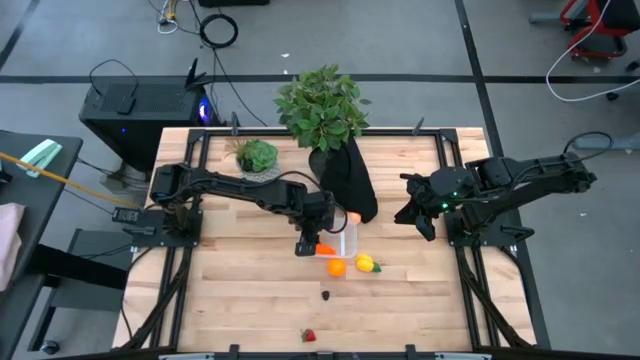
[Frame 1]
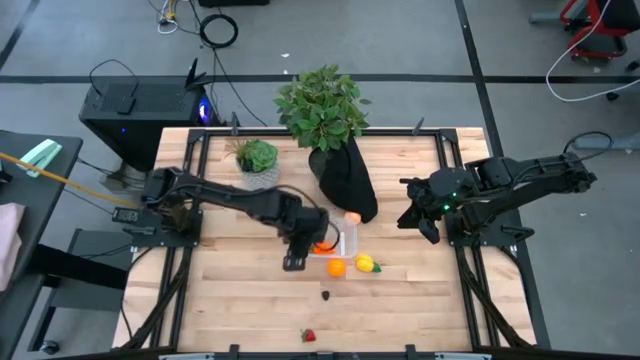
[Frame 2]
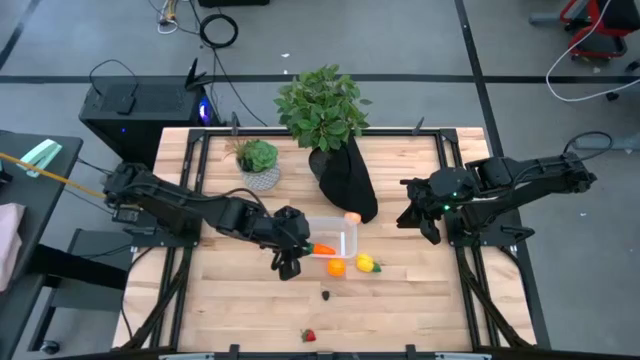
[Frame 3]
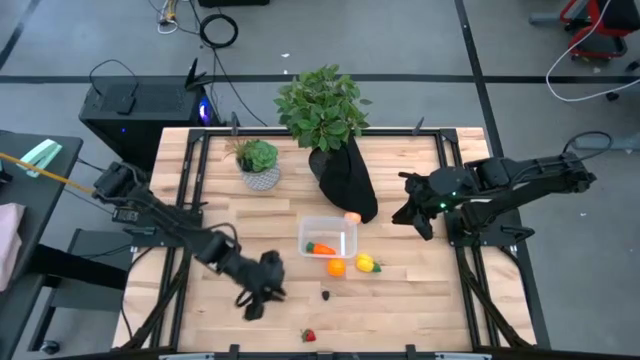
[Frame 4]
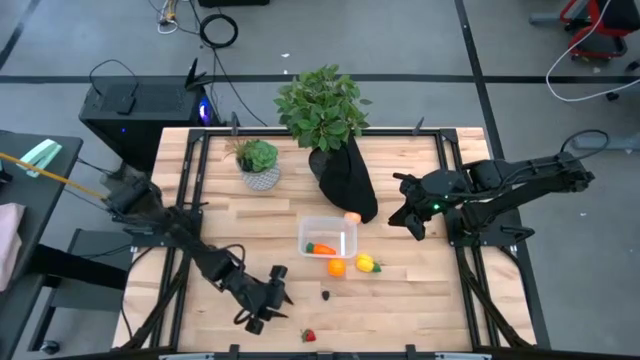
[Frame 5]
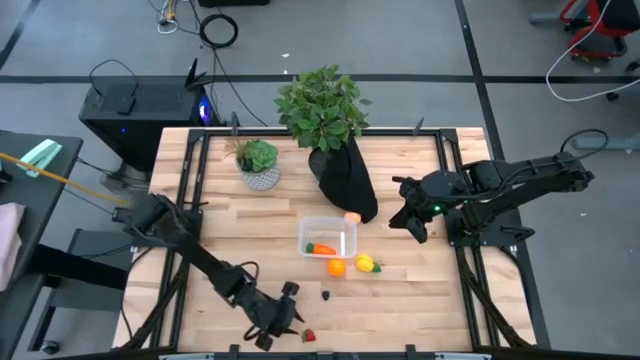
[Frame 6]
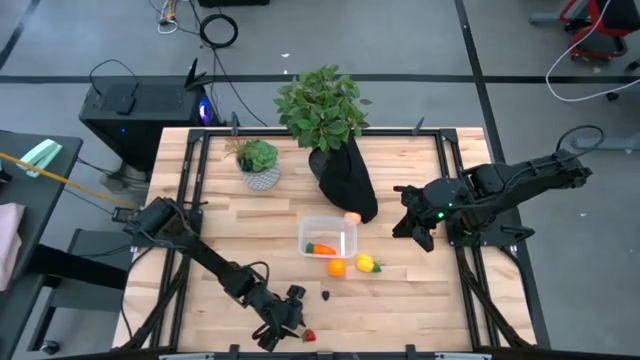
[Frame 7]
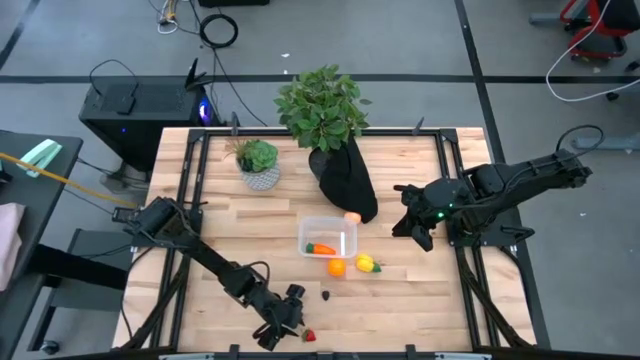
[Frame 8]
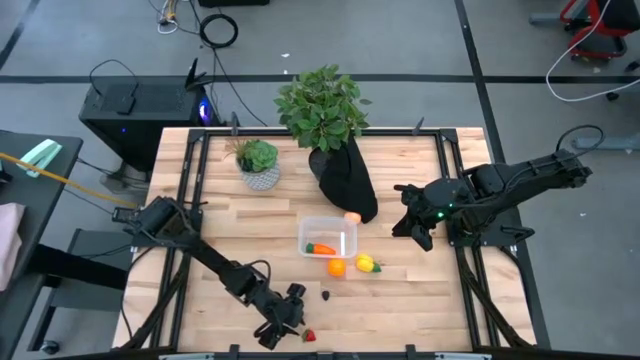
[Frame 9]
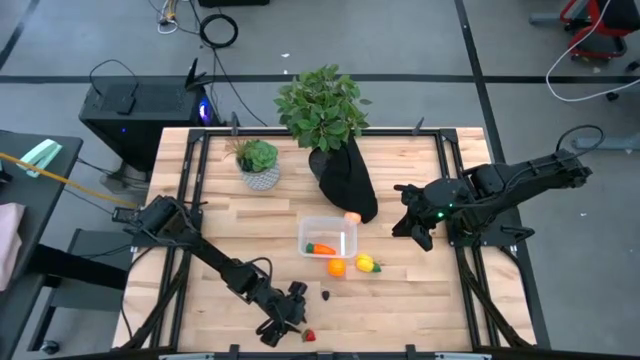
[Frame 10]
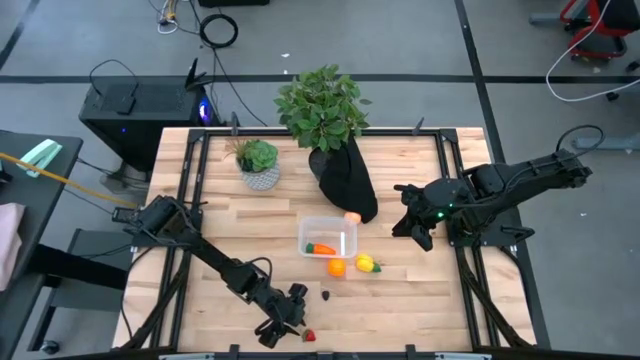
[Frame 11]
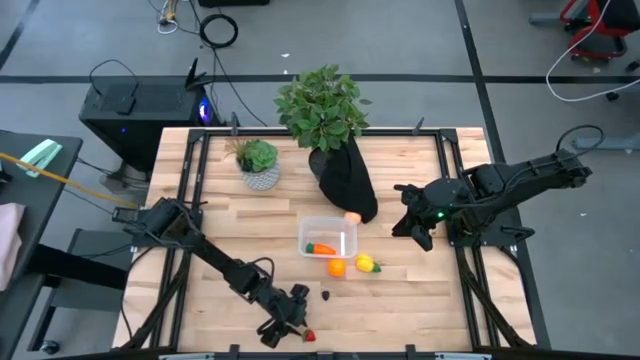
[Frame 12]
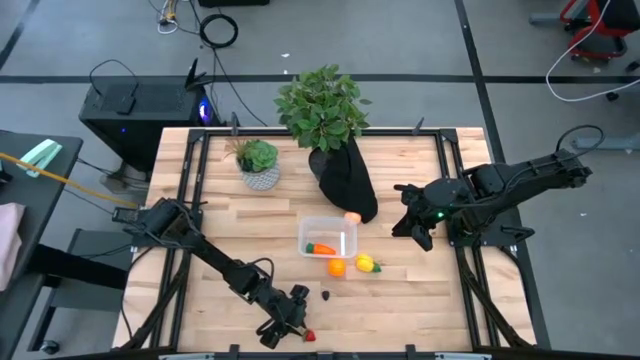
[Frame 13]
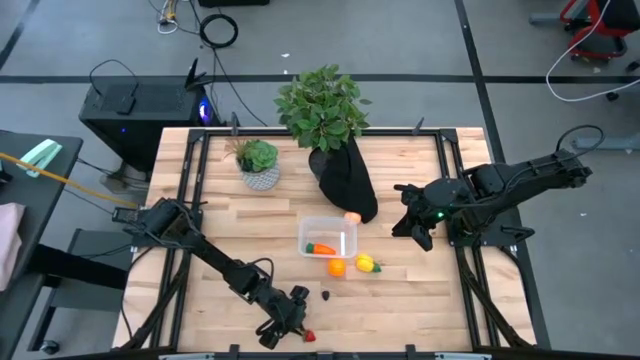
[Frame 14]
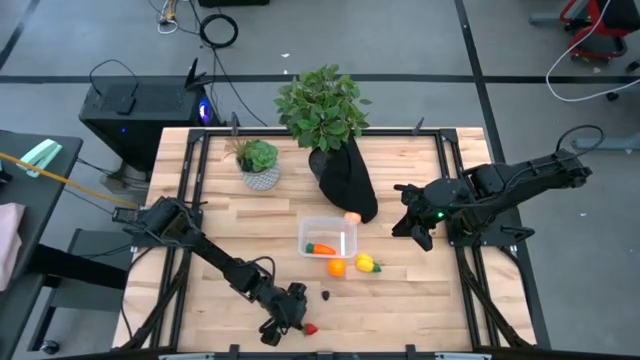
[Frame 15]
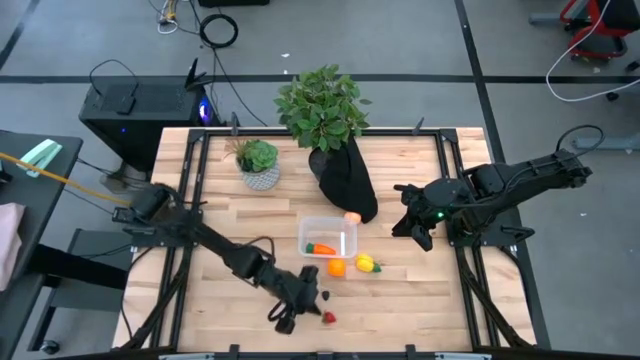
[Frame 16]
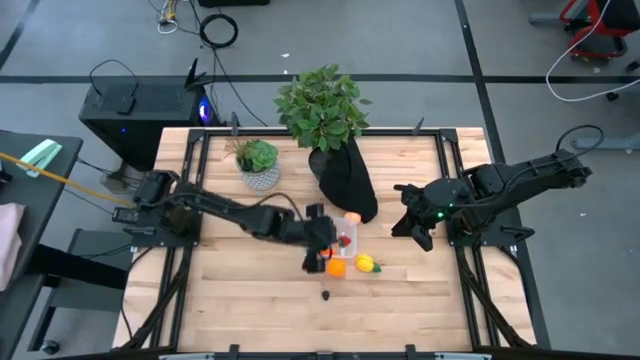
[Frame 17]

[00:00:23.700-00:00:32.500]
Task: Pick and placing Produce into tupperware
Put the red strawberry into the transparent bin

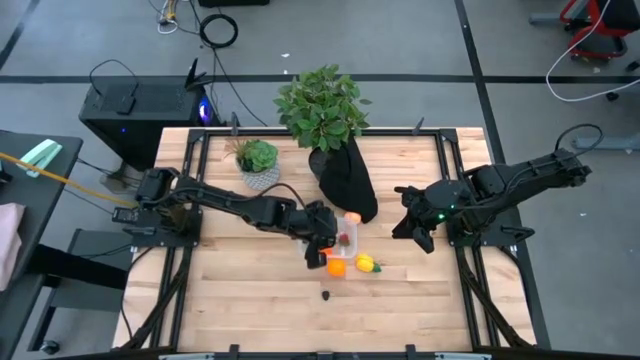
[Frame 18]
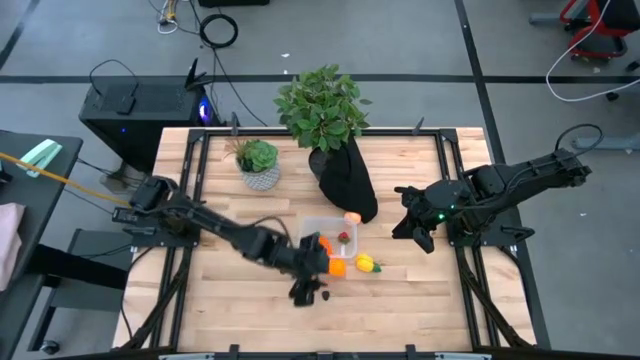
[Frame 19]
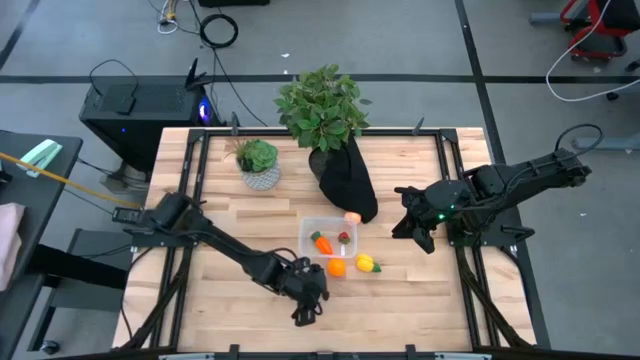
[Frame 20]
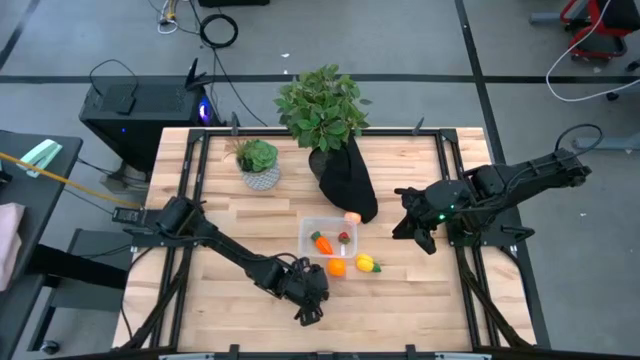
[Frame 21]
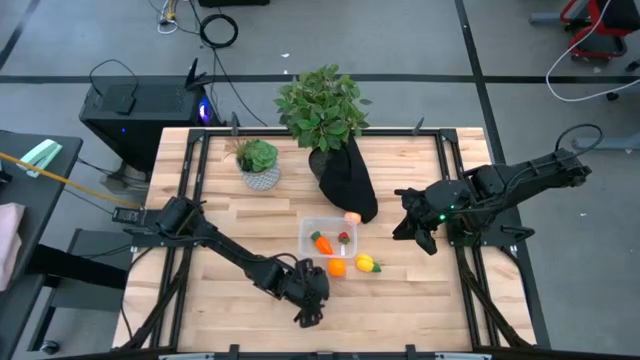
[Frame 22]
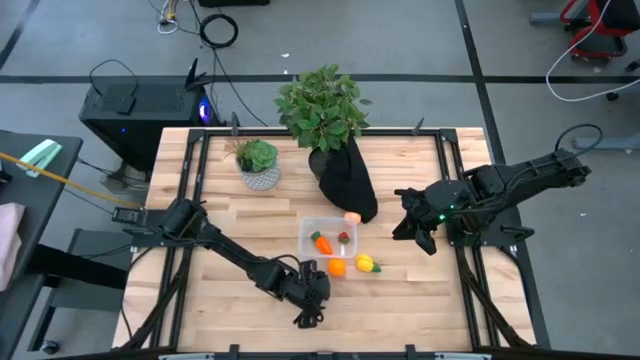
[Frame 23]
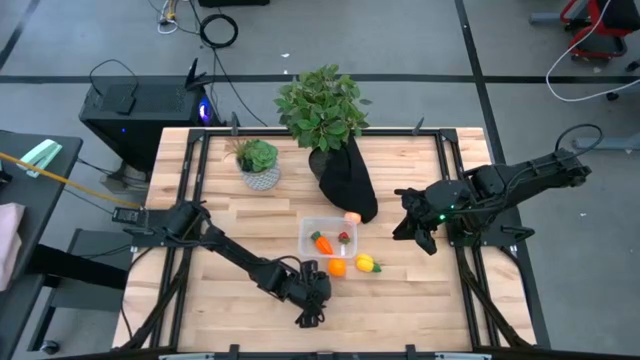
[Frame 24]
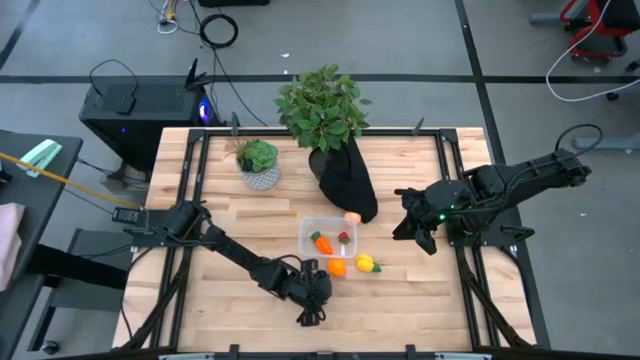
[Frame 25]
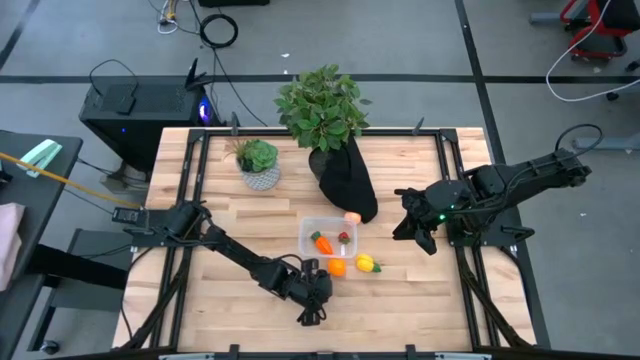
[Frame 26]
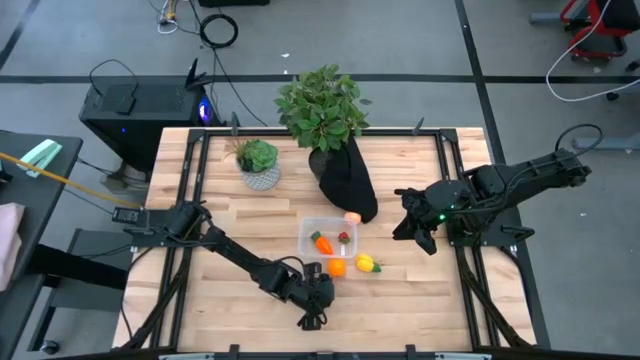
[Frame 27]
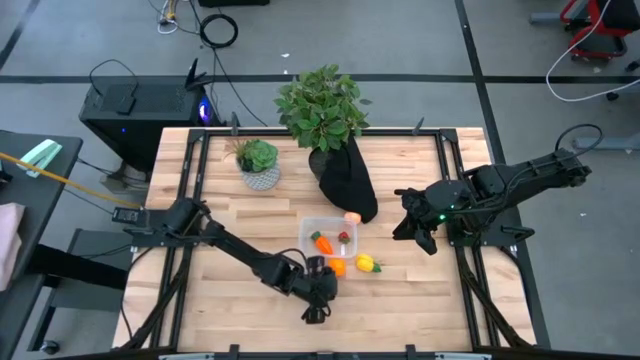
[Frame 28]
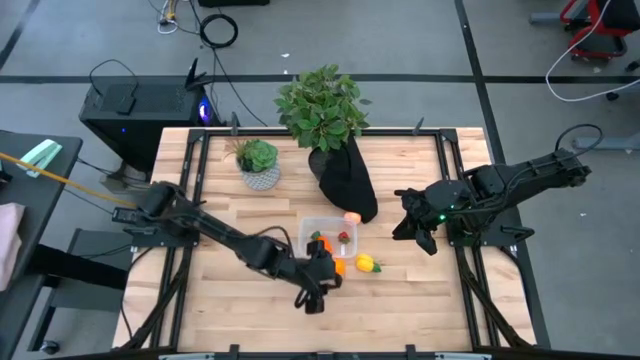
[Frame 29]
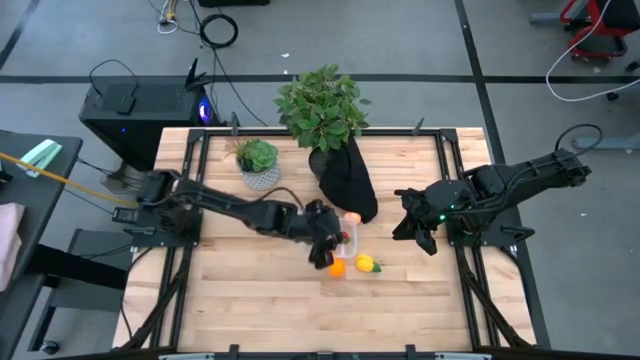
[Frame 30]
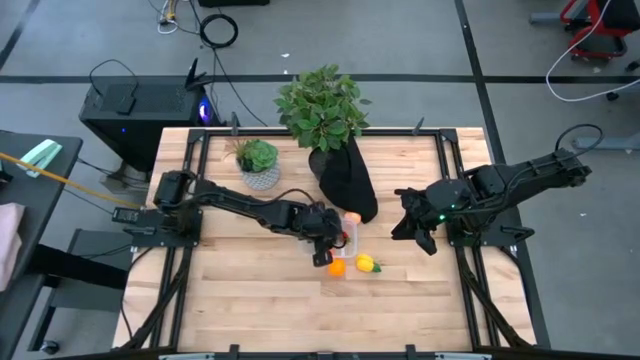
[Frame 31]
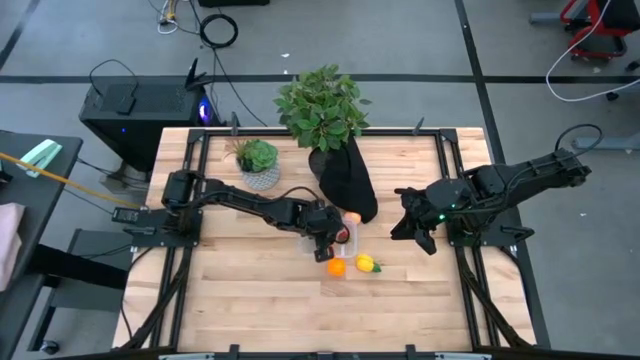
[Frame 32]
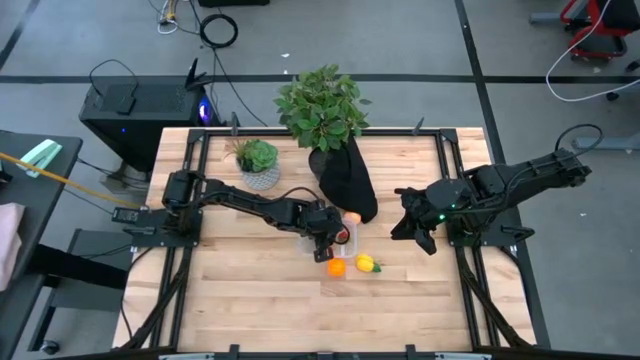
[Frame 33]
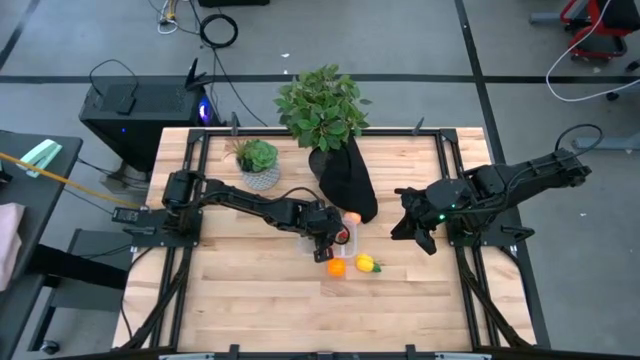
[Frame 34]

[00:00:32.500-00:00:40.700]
Put the dark purple blackberry into the transparent bin

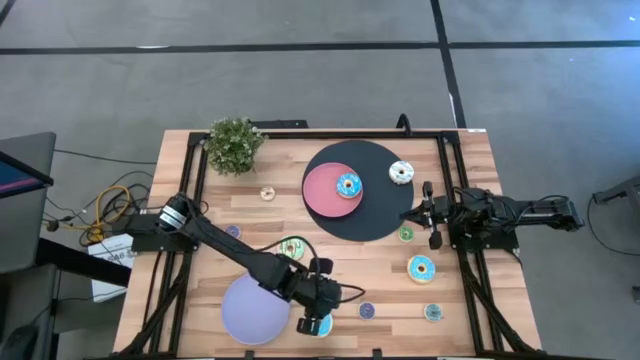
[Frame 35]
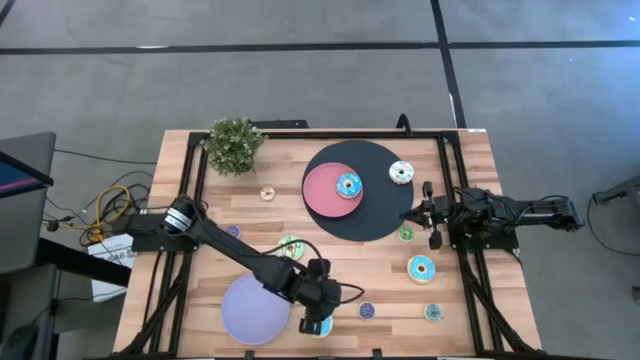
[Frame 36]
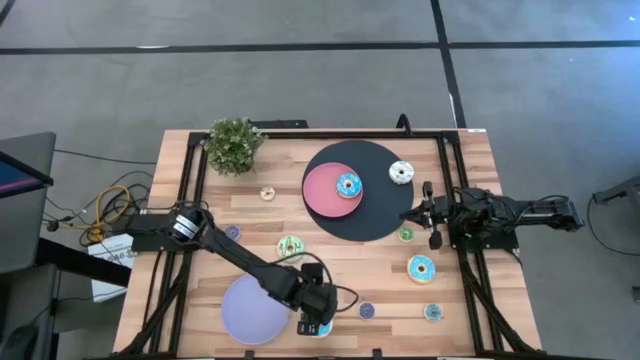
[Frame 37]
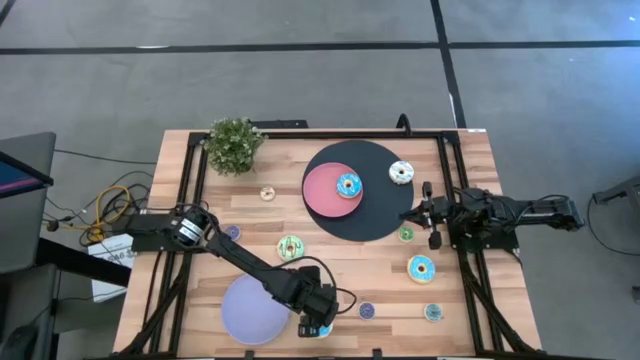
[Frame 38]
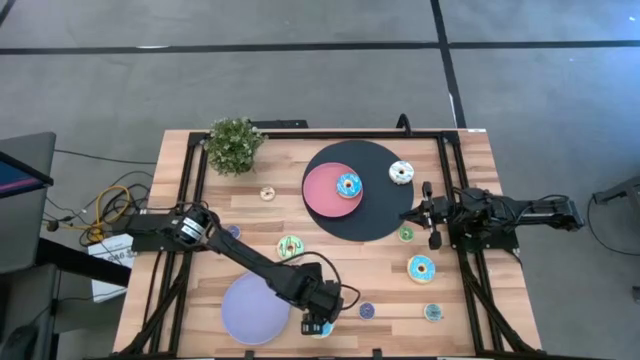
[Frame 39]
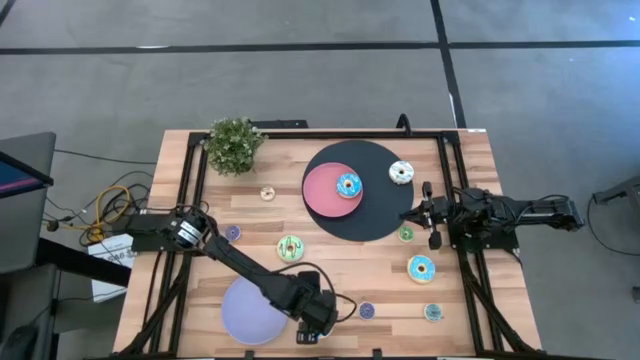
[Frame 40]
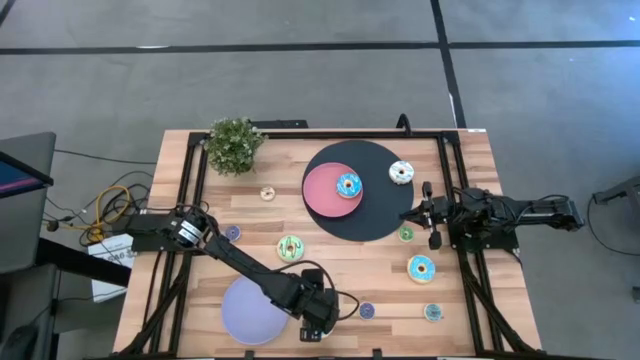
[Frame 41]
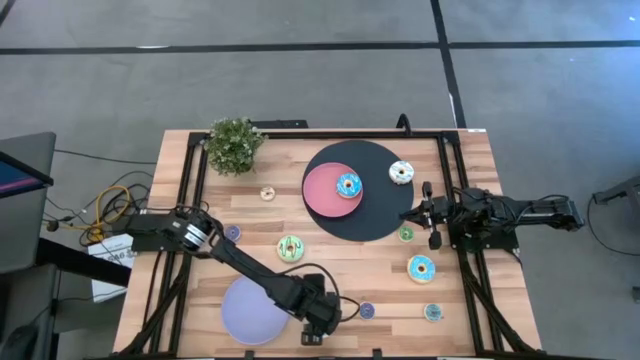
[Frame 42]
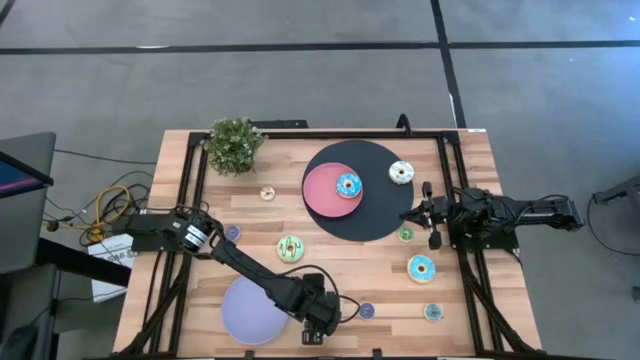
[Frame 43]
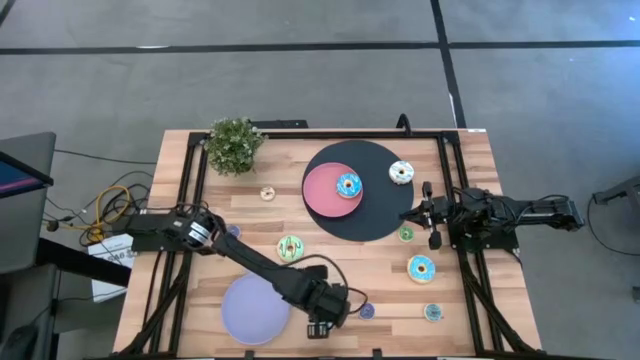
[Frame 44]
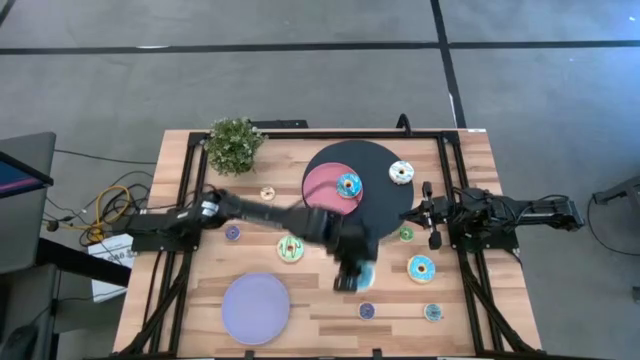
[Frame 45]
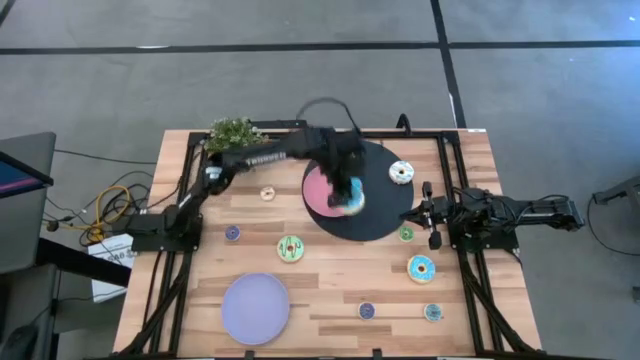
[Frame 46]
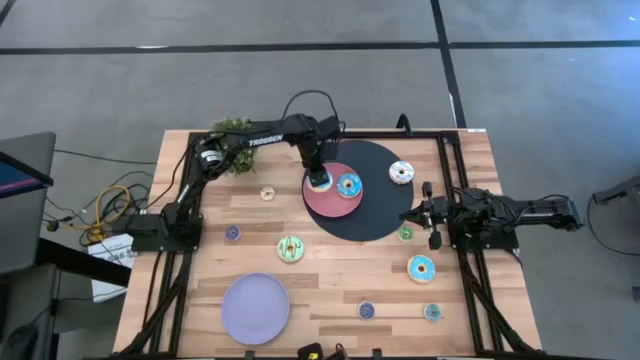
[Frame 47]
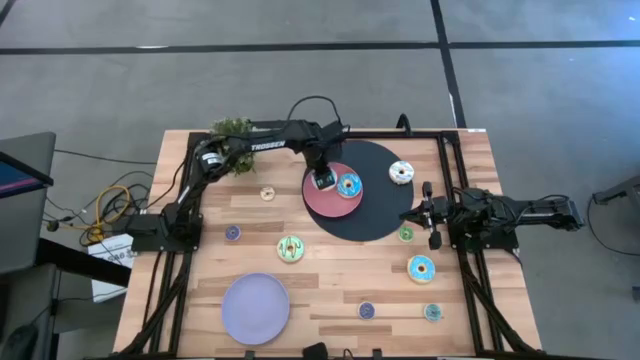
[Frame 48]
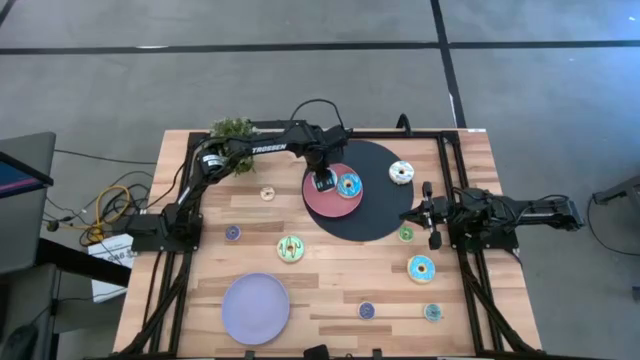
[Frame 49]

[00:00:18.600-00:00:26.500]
Task: Pick & Place donuts
Put the big blue donut on the pink plate
